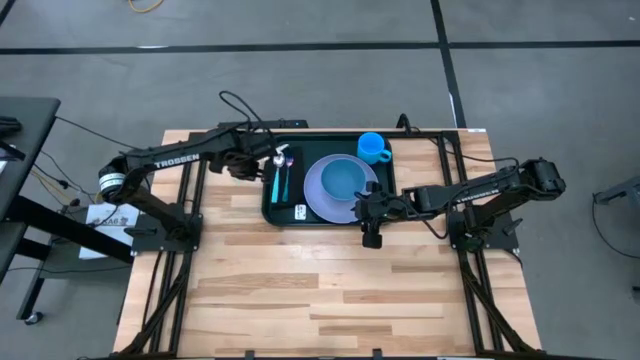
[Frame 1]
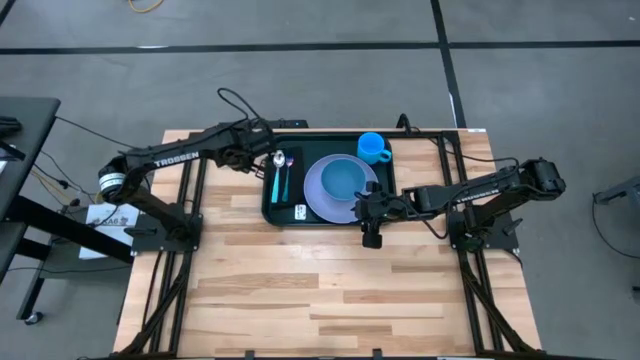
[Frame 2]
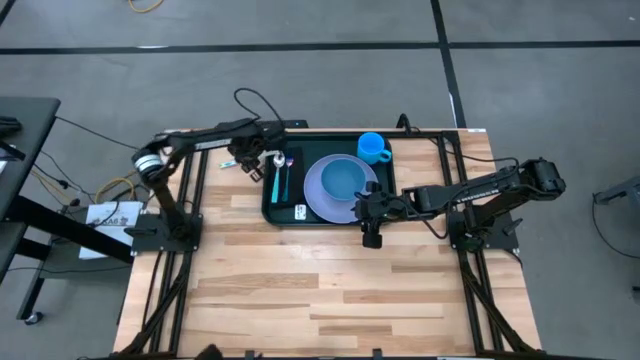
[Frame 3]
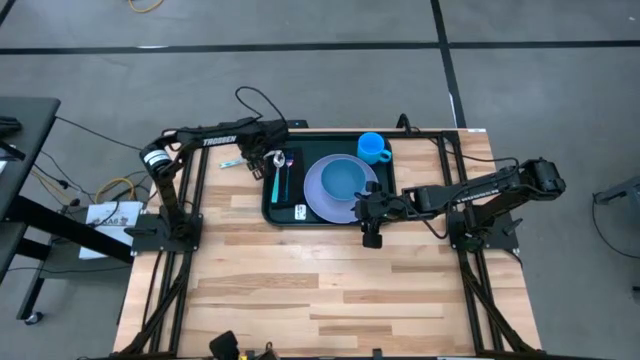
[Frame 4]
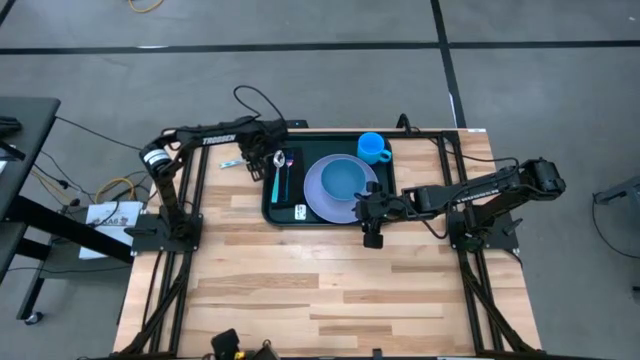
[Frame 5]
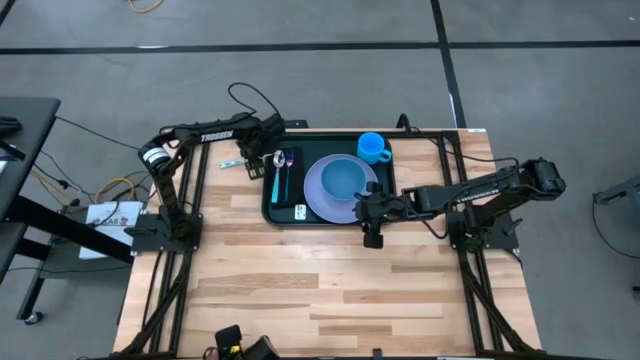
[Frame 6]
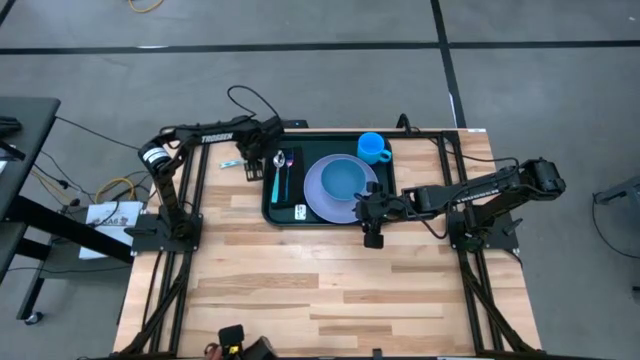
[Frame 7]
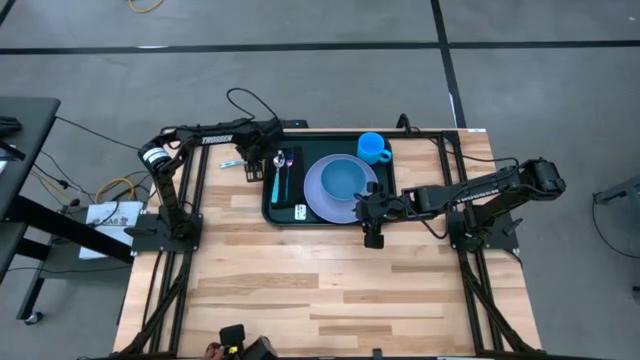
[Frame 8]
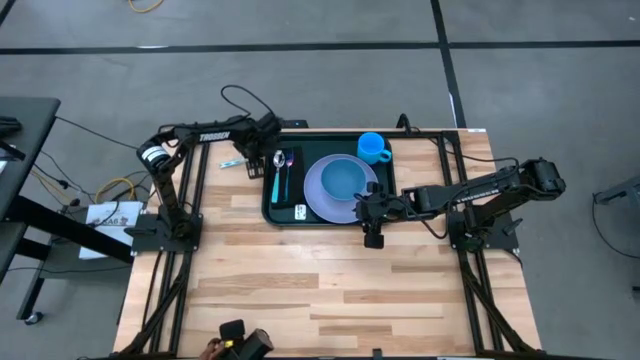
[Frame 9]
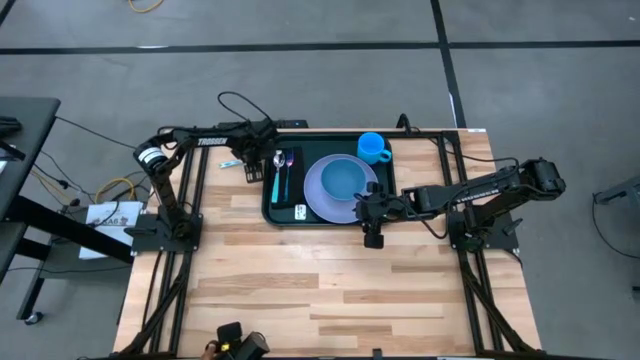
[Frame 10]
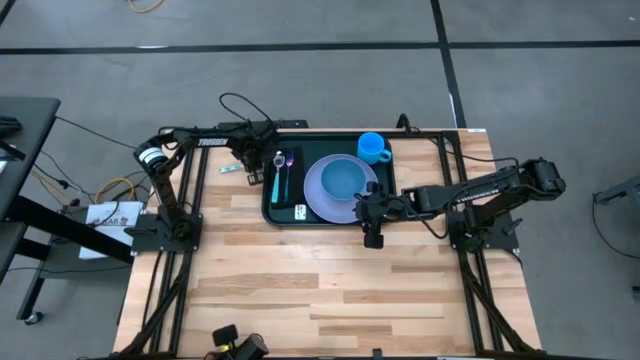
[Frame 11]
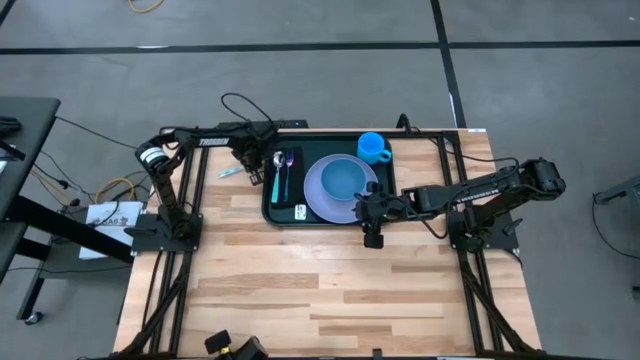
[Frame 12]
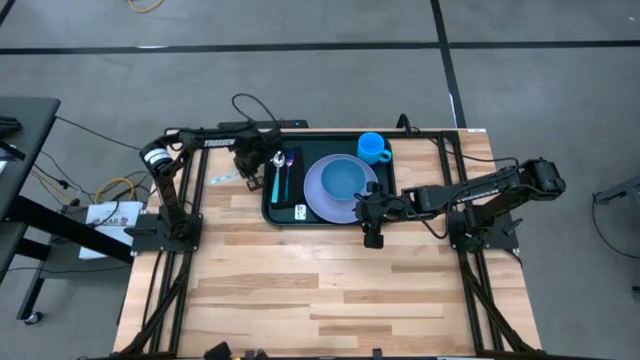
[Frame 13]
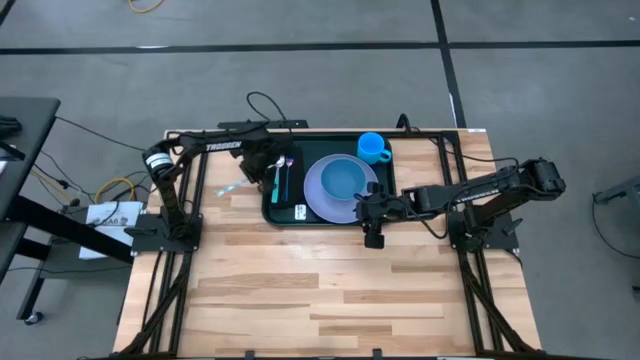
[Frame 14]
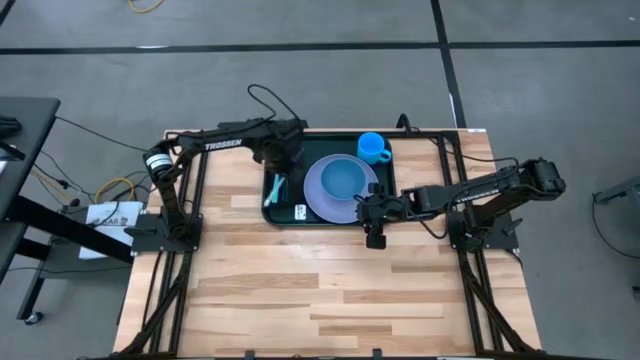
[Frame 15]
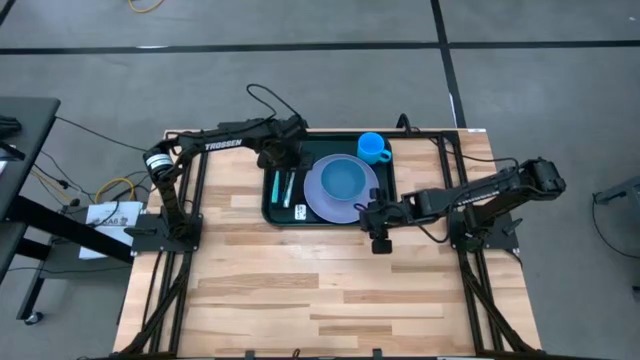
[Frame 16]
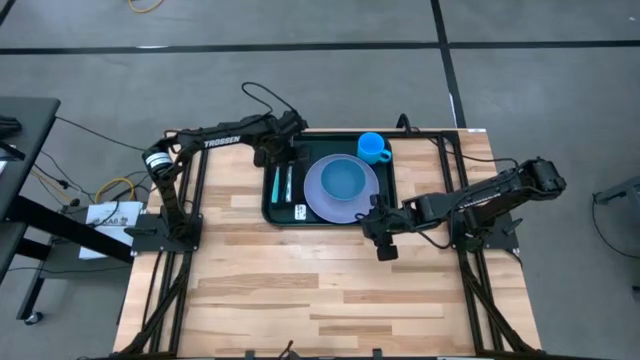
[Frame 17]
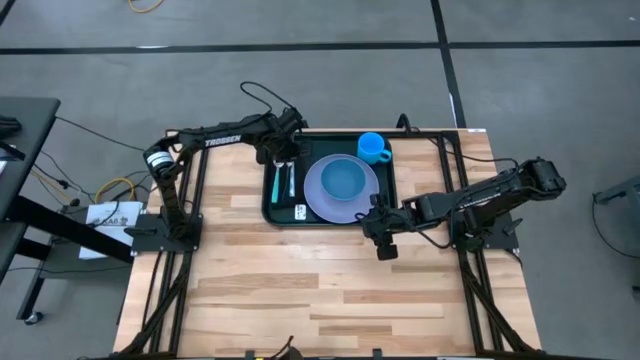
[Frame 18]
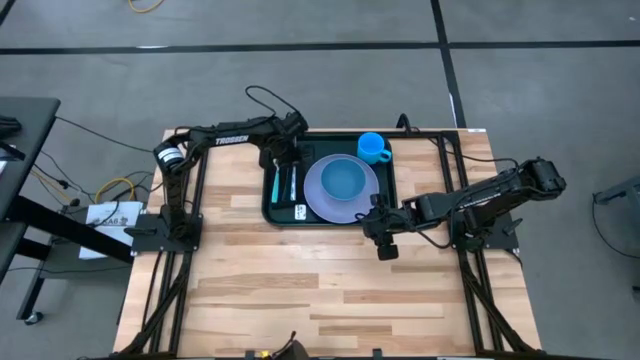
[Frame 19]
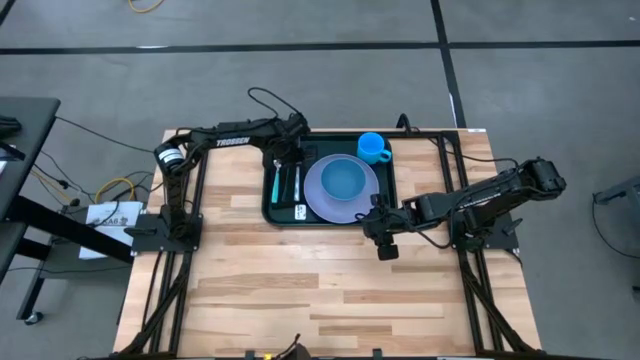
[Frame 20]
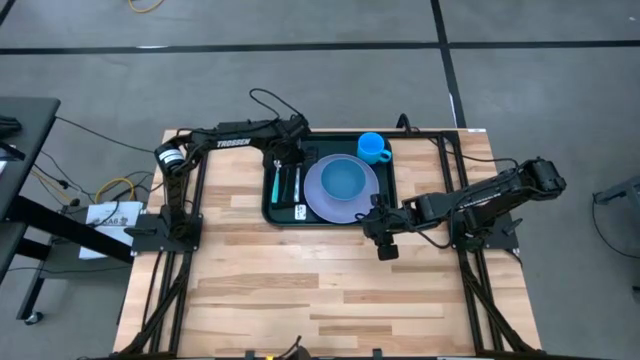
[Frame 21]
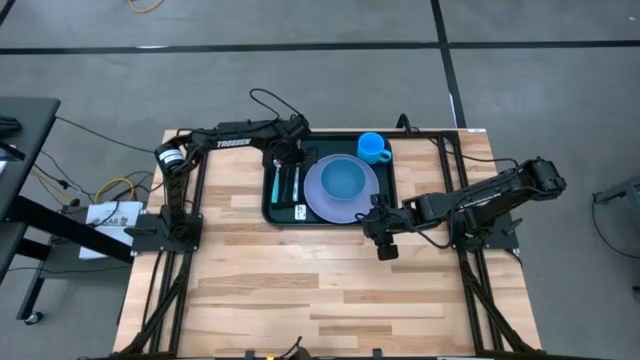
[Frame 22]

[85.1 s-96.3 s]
Task: Set up tray
Put the white-green table knife on top of the black table napkin to right side of the violet fork

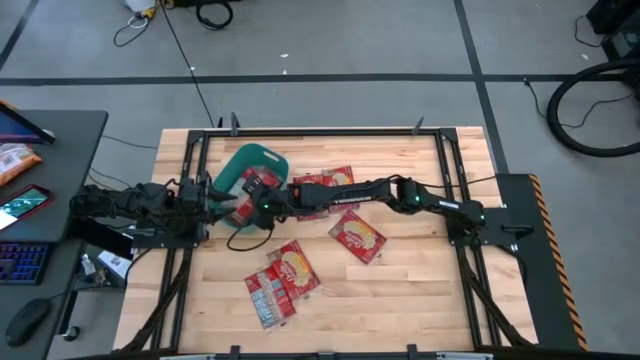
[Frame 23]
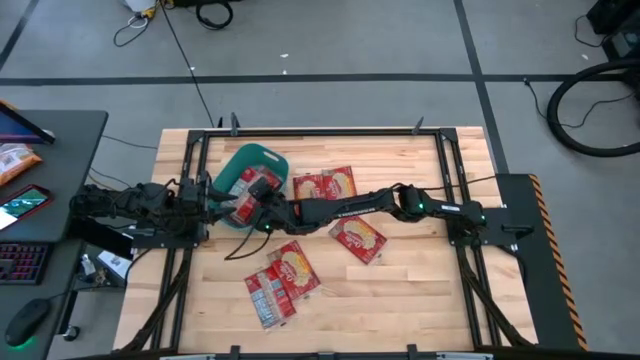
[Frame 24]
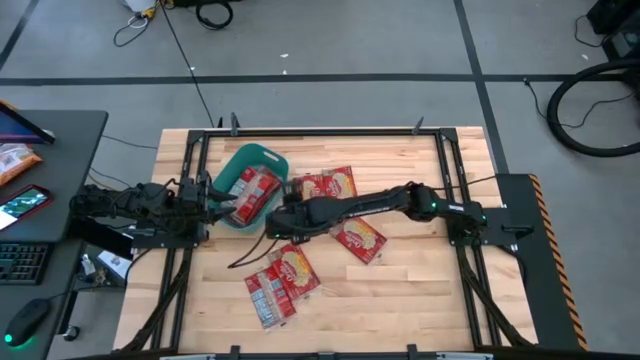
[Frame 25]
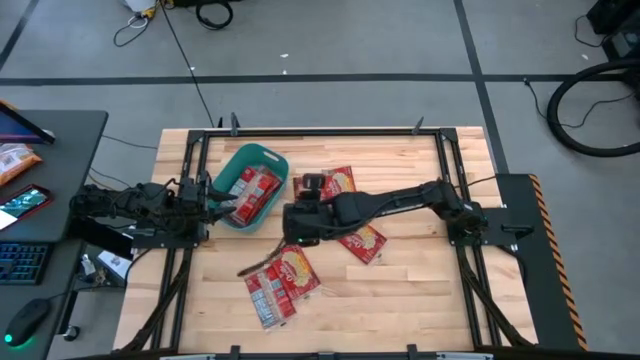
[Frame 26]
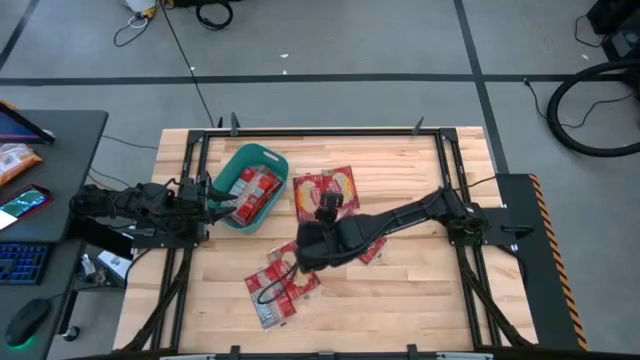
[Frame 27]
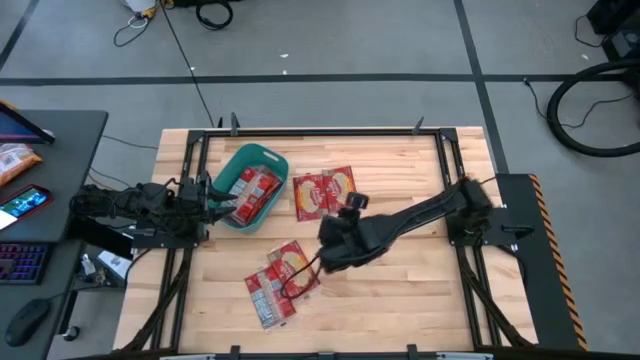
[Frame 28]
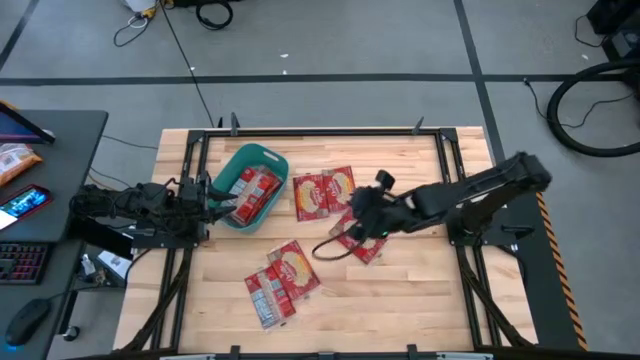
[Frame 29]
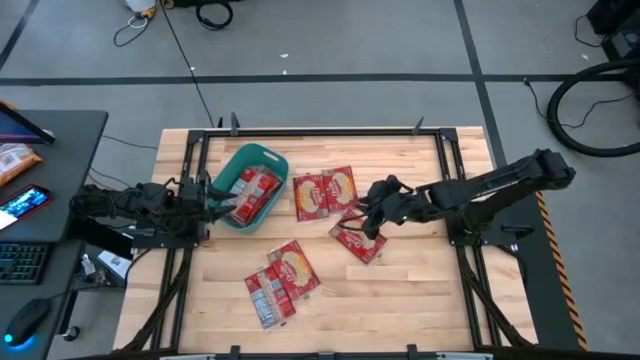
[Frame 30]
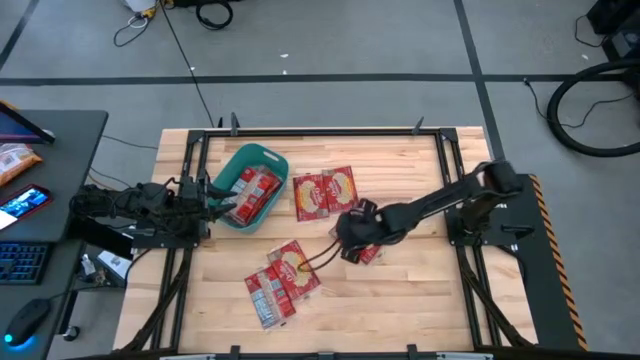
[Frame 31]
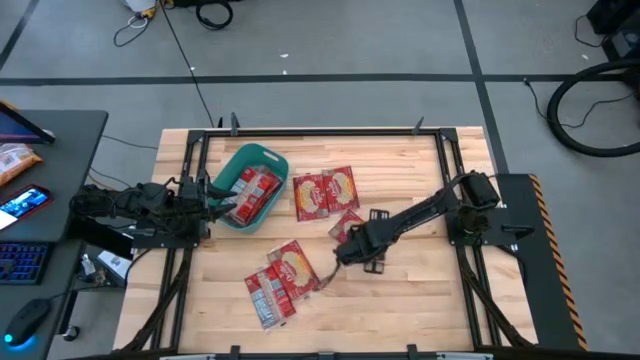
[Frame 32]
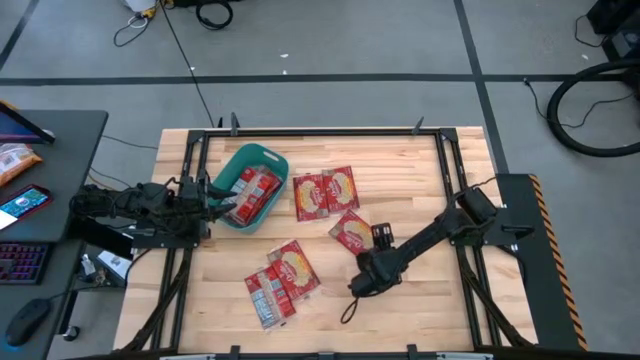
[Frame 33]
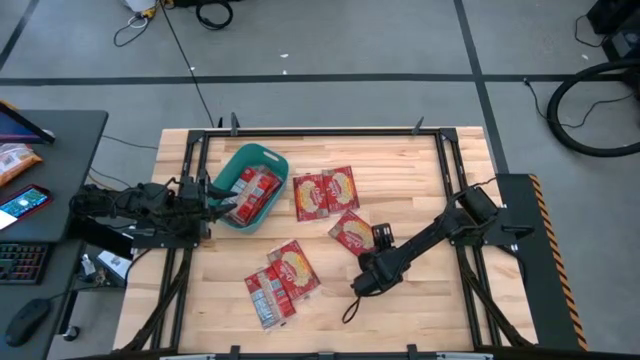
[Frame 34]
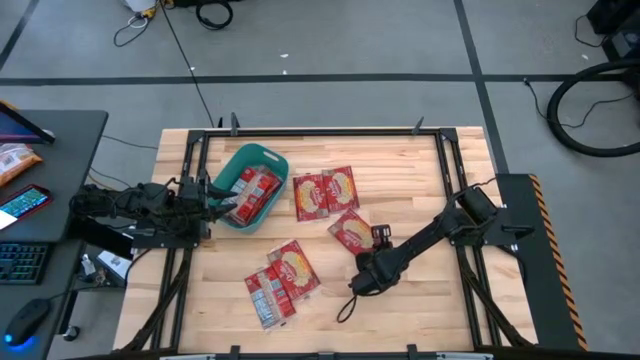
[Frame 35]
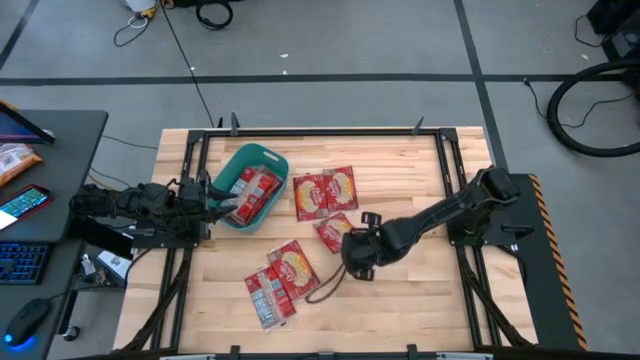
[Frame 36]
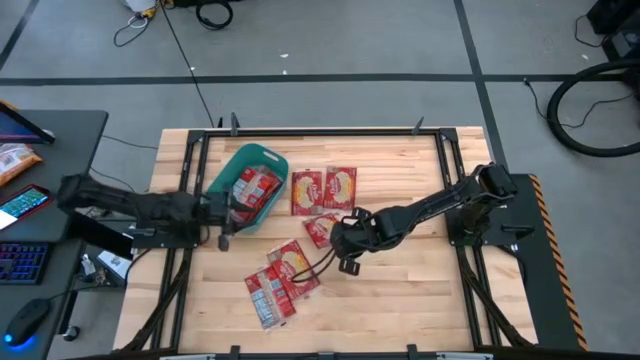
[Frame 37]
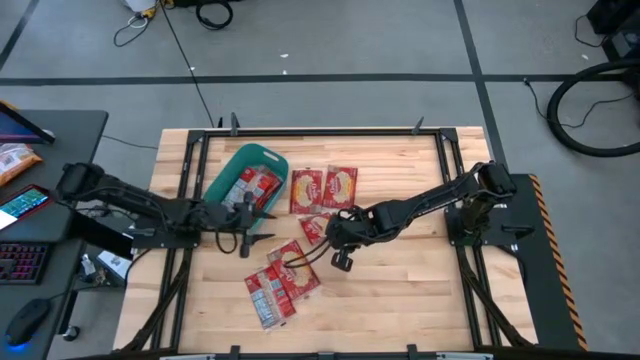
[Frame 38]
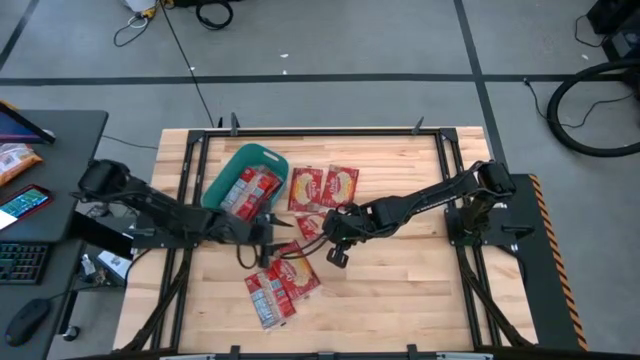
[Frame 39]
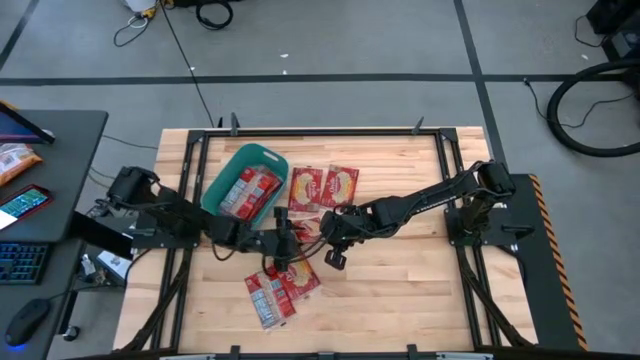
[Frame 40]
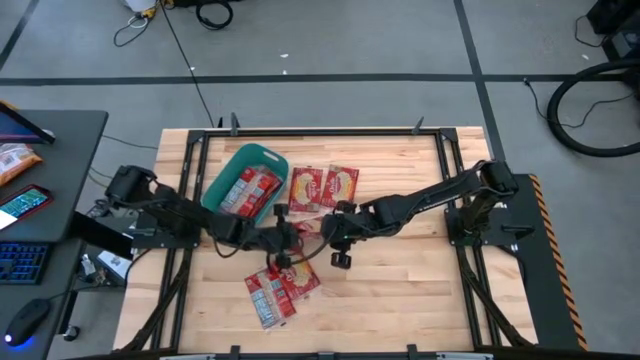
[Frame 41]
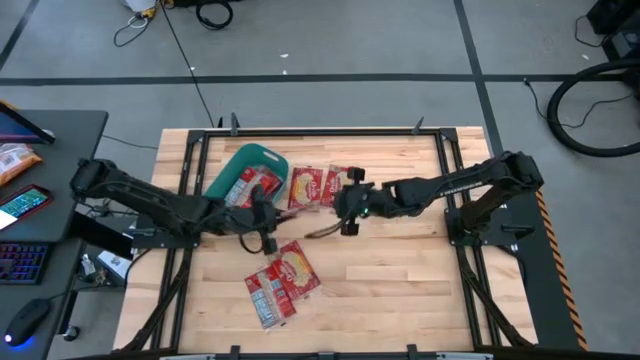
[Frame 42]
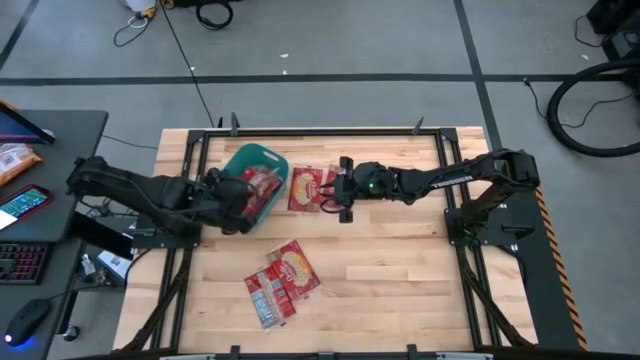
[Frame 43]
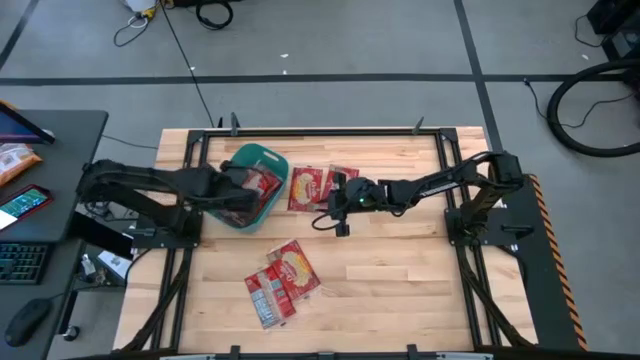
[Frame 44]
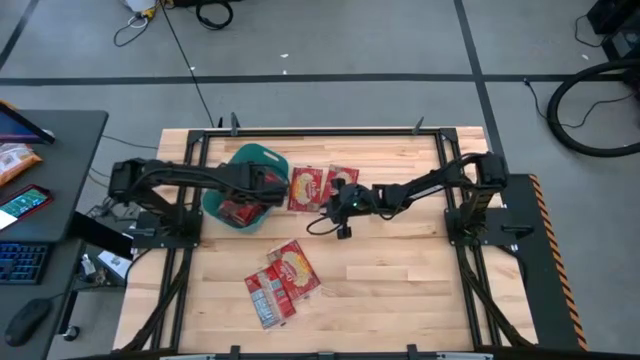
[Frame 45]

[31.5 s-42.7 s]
Task: Sort popcorn bags into baskets
Put the red popcorn bag into the green bin
